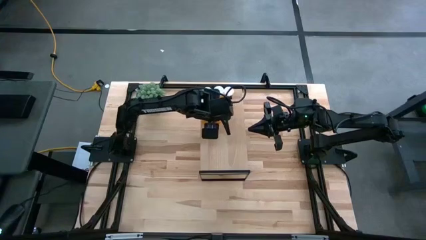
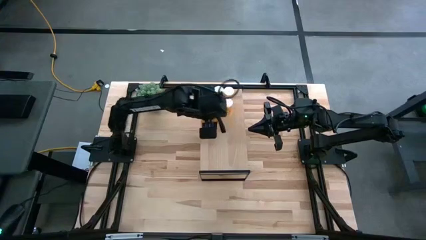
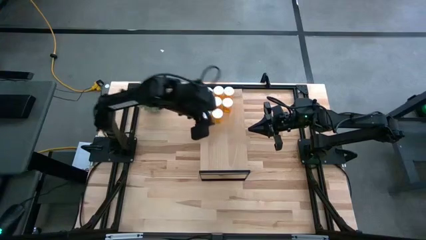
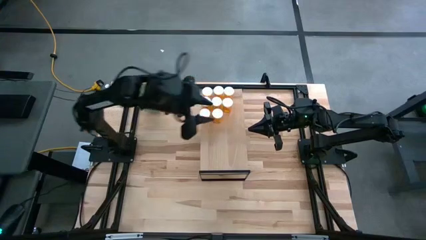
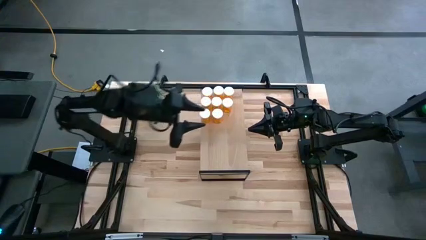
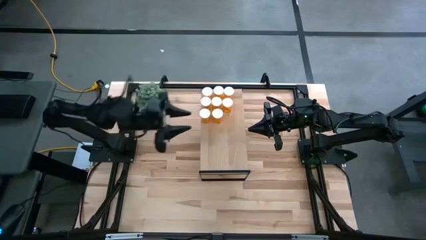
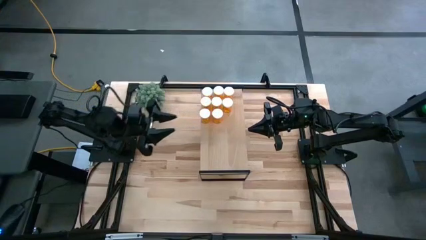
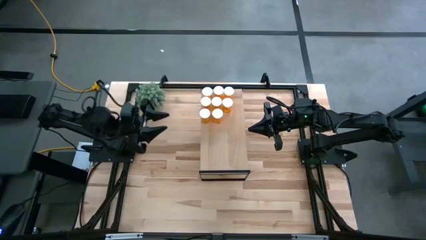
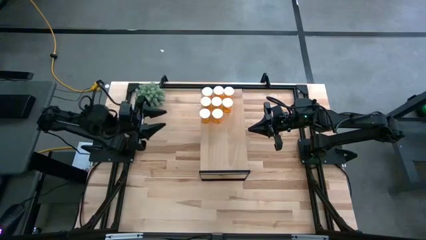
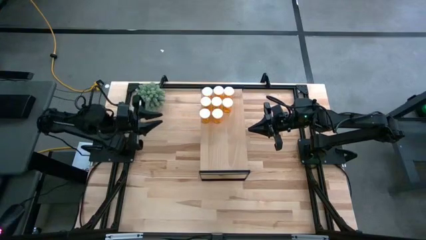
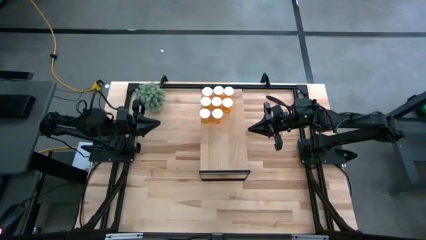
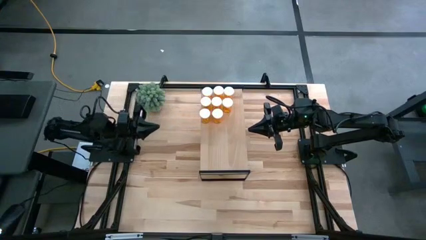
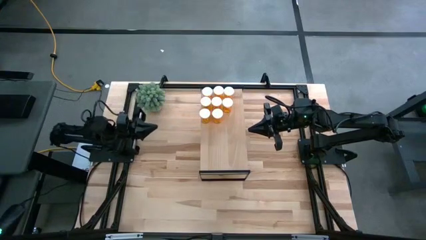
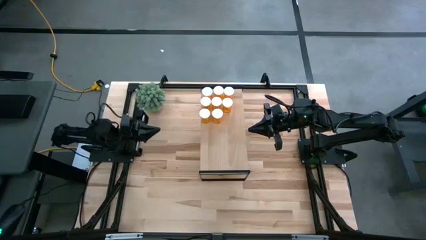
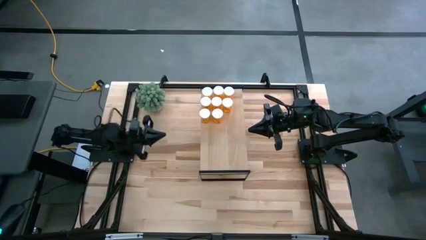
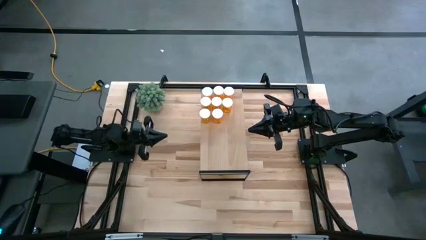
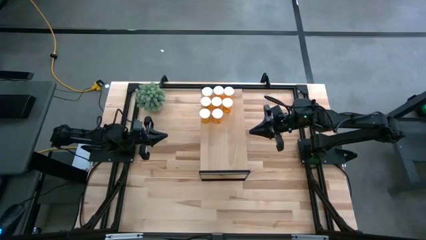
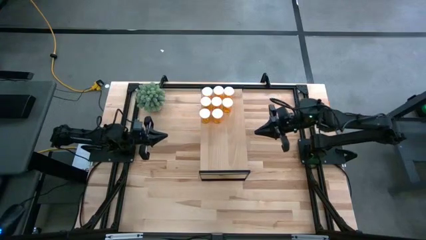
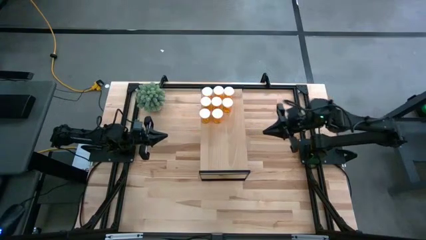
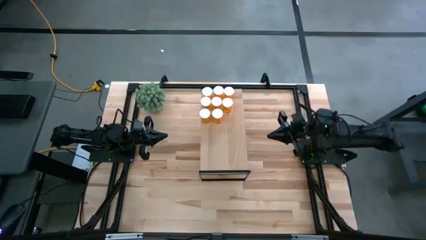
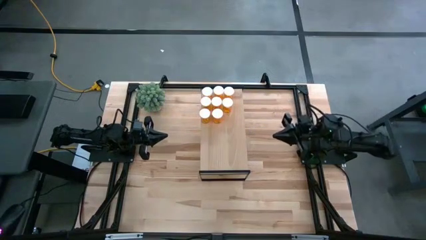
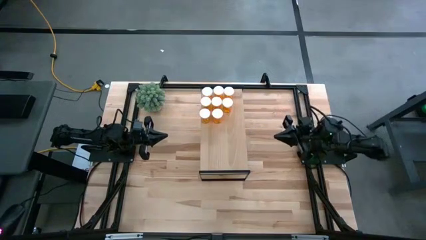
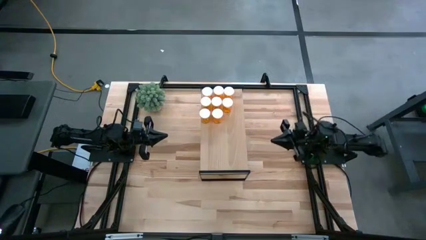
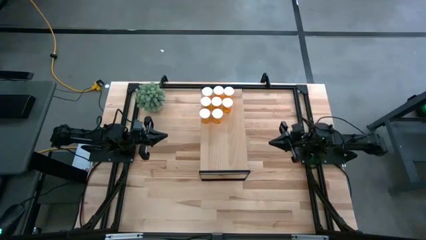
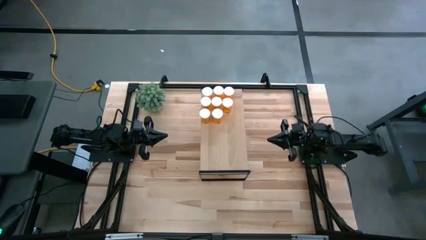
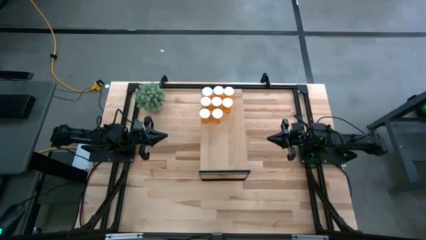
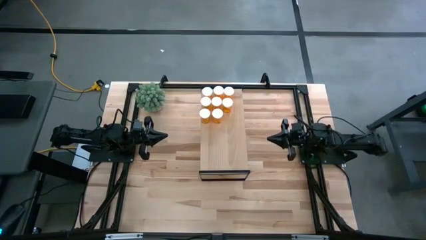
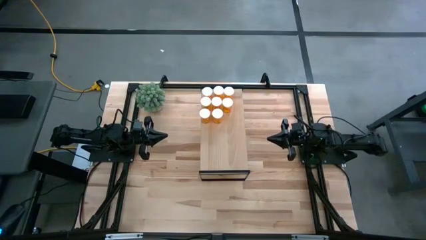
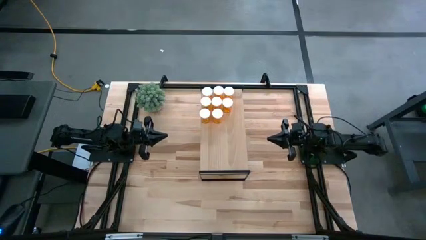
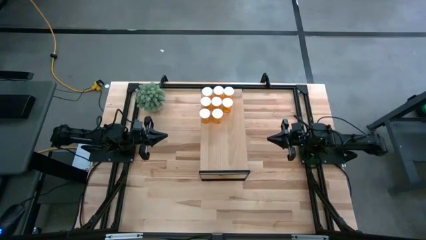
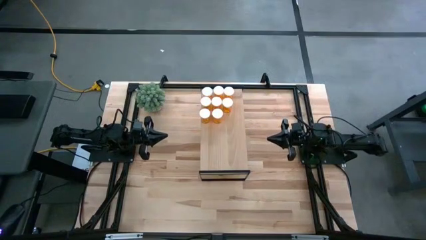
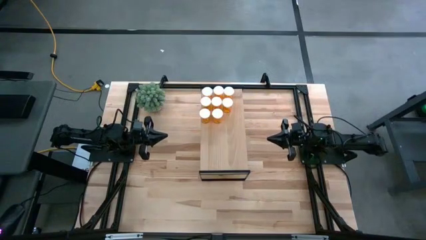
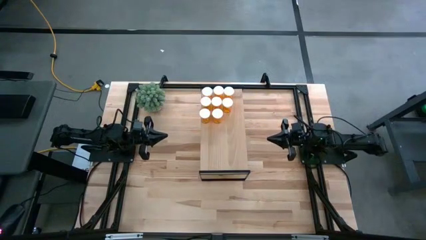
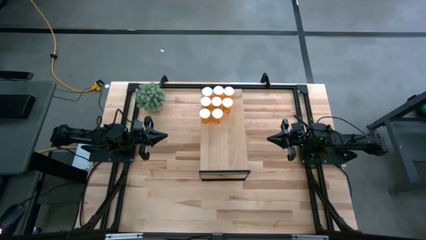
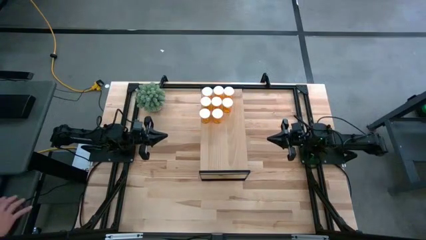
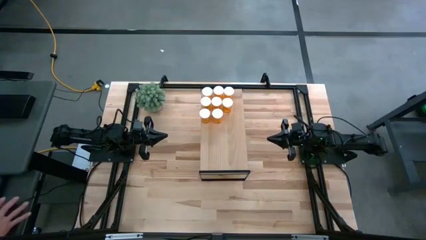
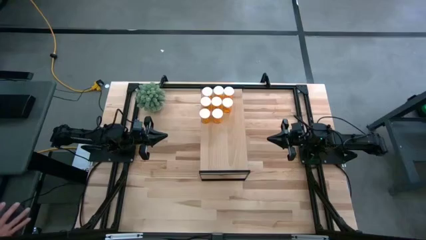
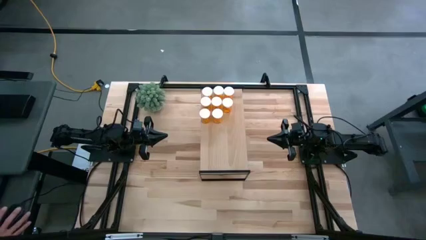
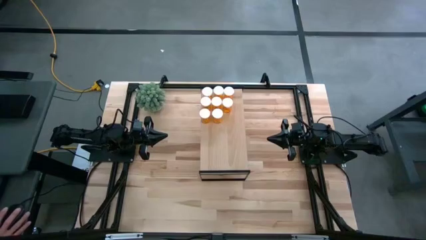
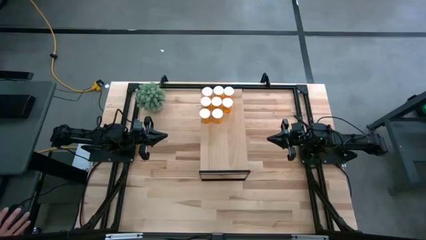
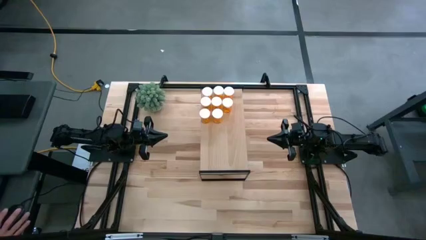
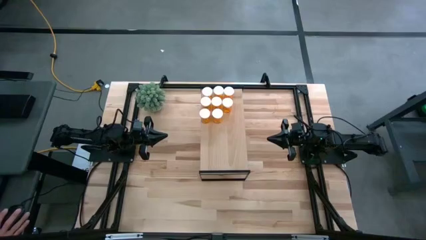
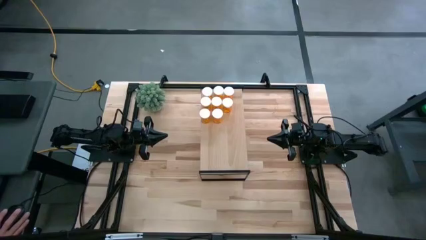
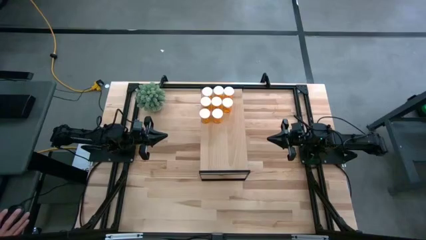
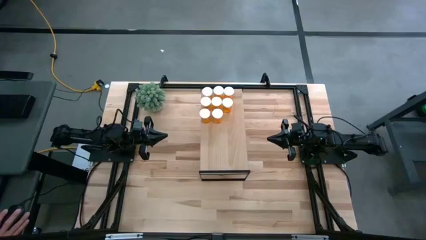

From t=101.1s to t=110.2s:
Task: Pick and place medicine bottles onto shelf by color
Return to Home Position

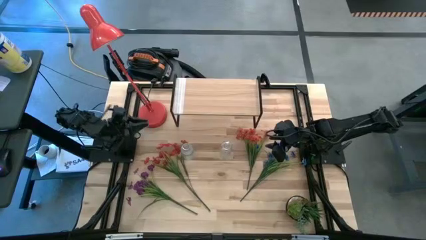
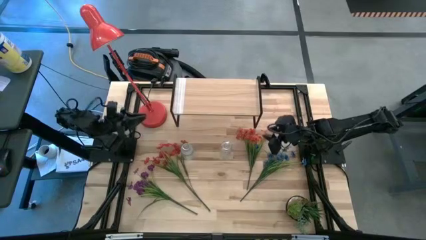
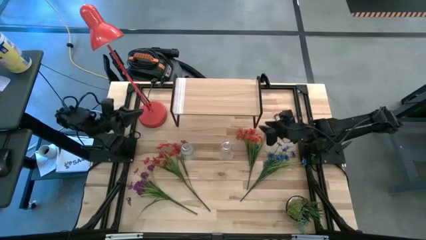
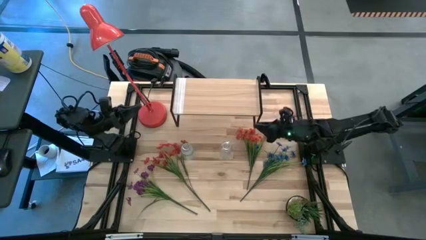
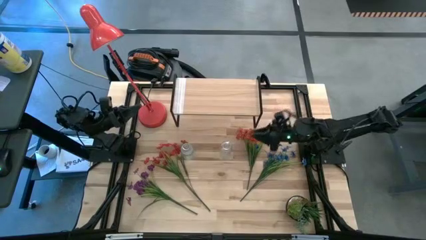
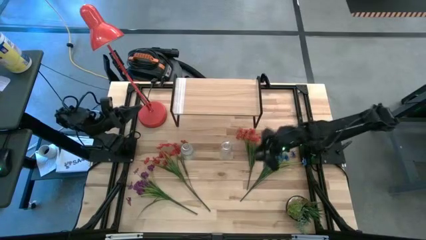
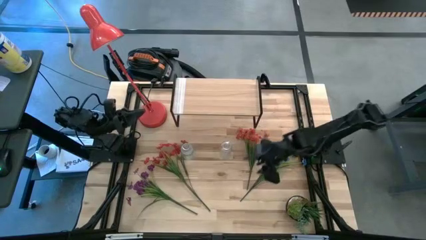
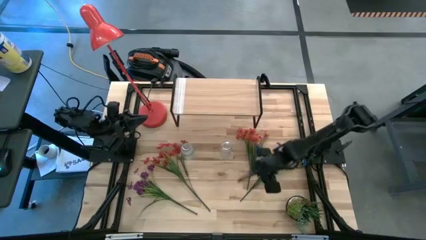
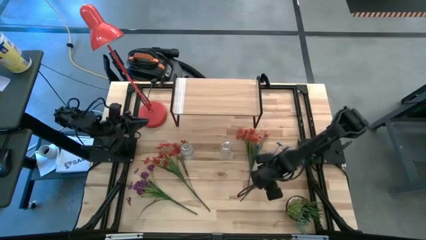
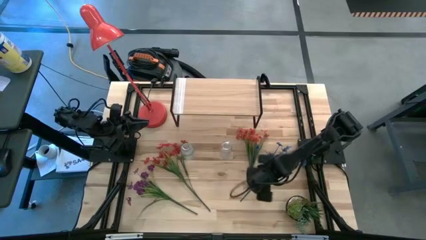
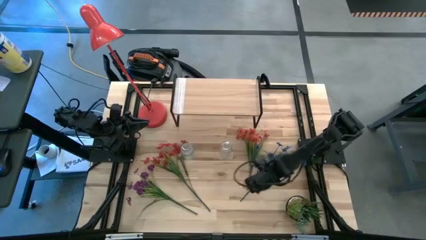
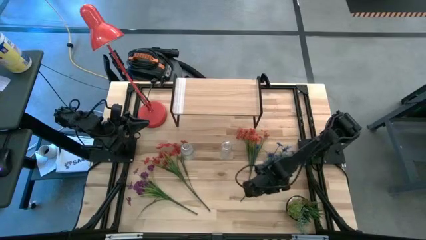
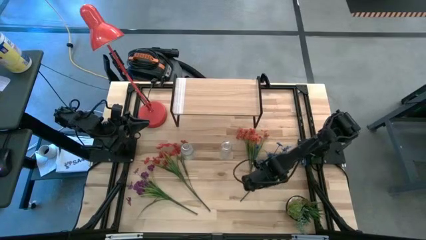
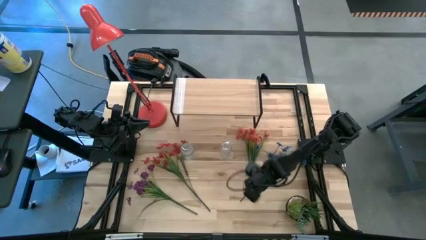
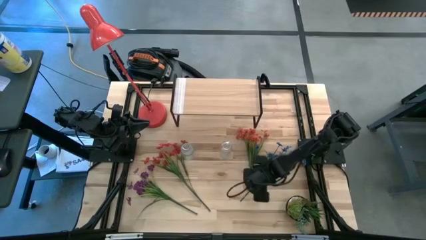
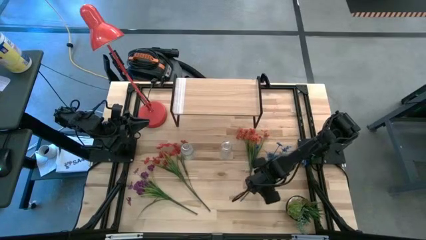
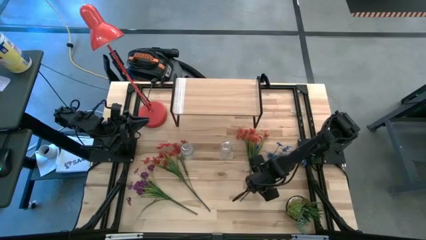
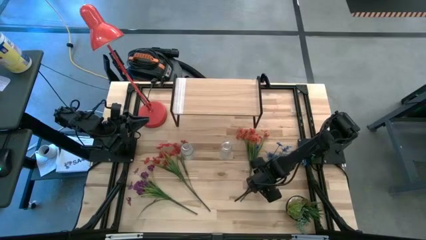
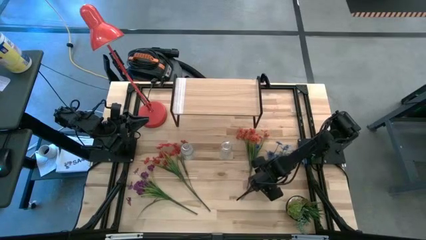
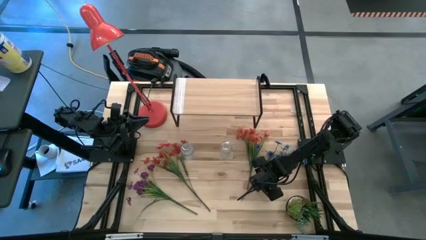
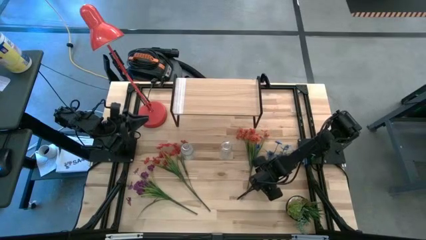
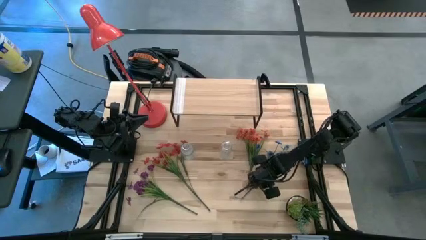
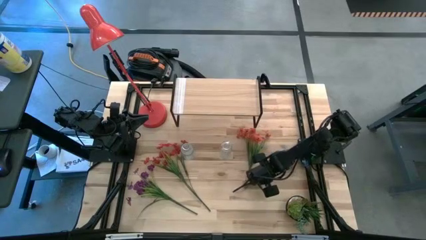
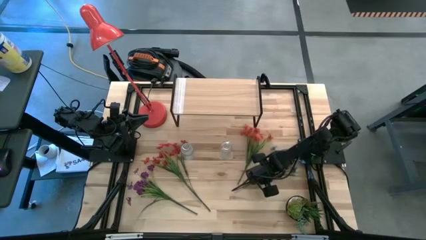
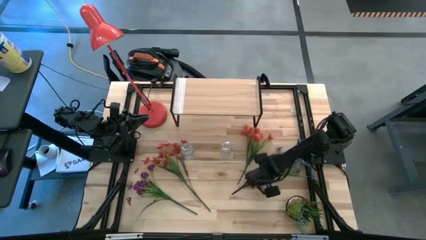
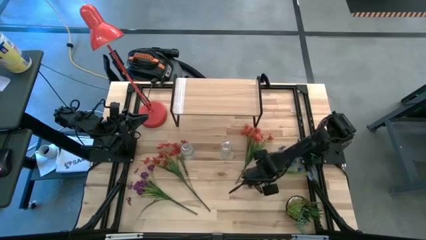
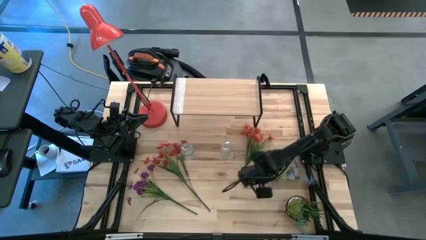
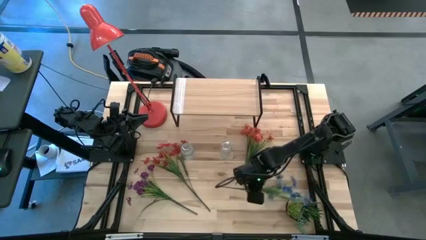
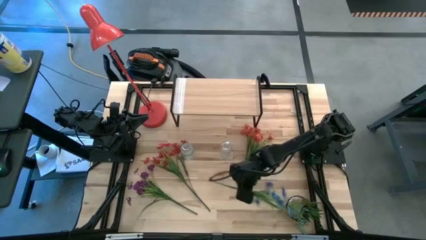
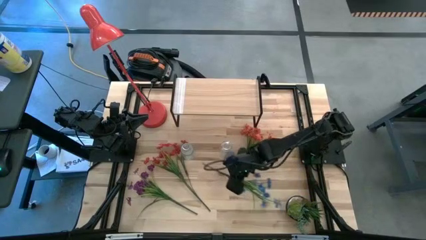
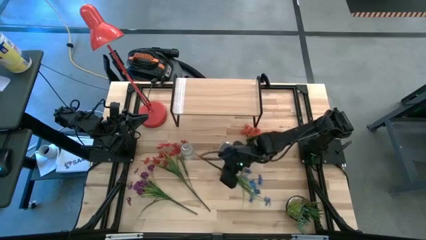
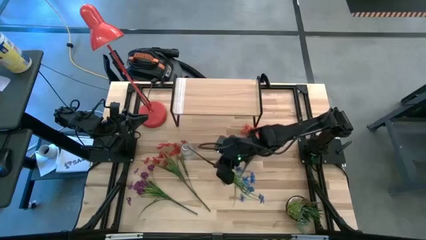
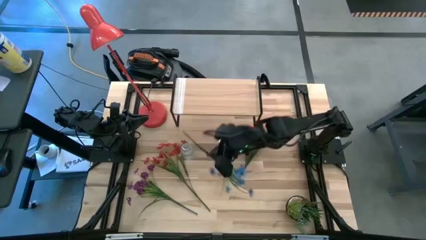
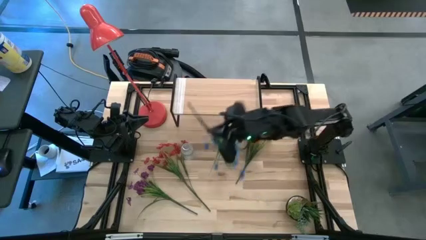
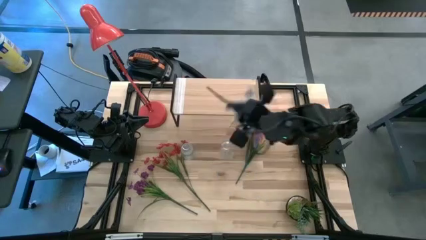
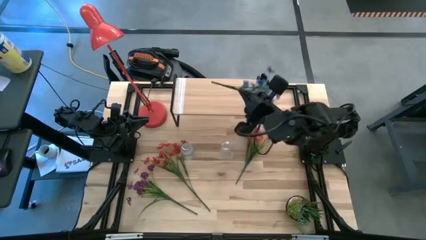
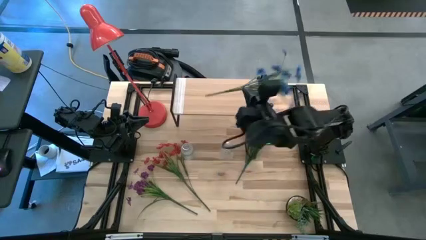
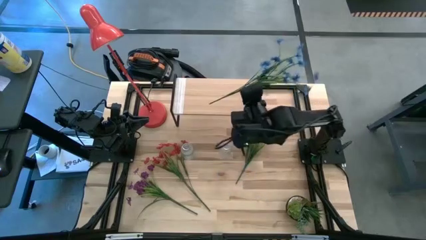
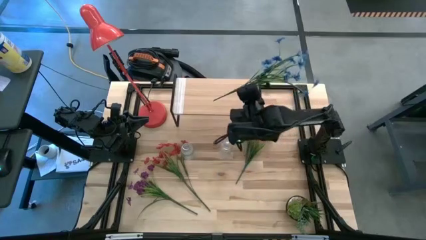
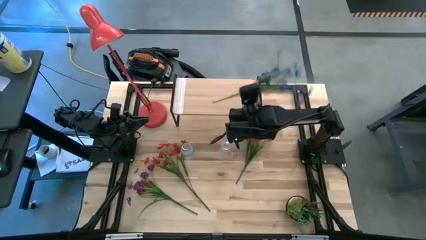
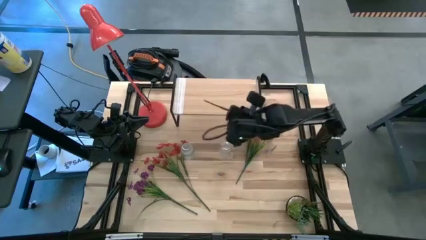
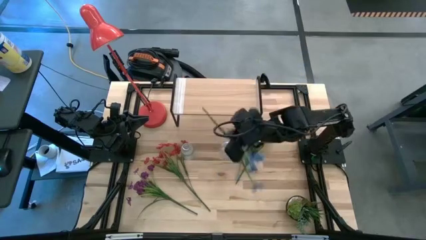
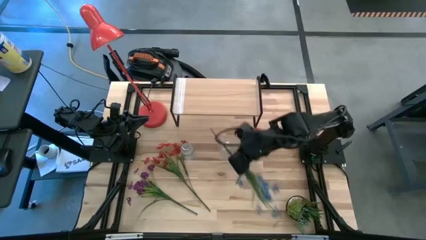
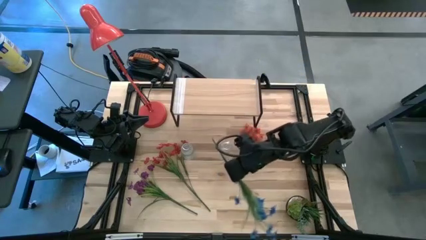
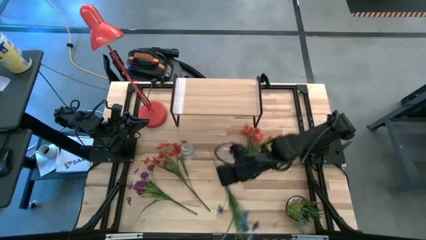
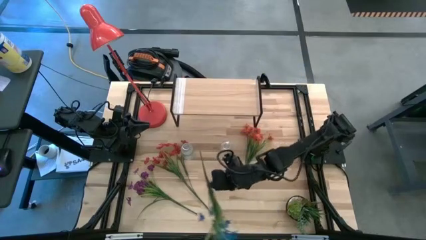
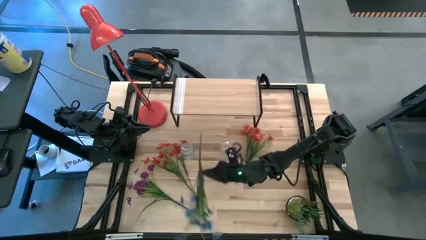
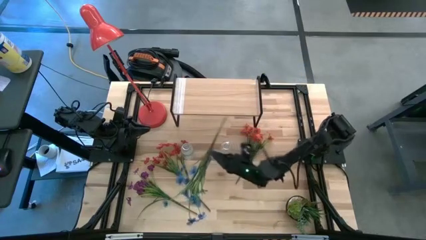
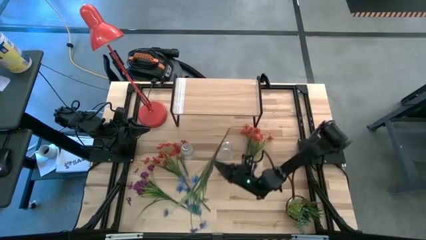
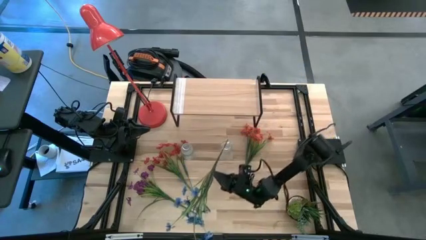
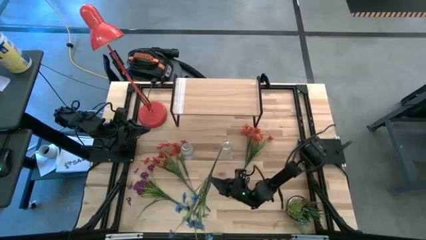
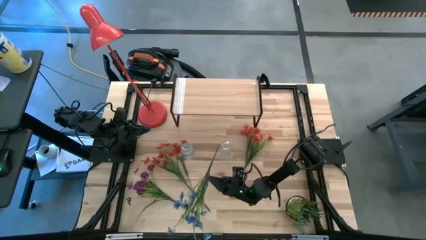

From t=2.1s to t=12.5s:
Task: Pick and place flowers into a vace then onto a shelf
Put the blue flowers into the right transparent flower vase
